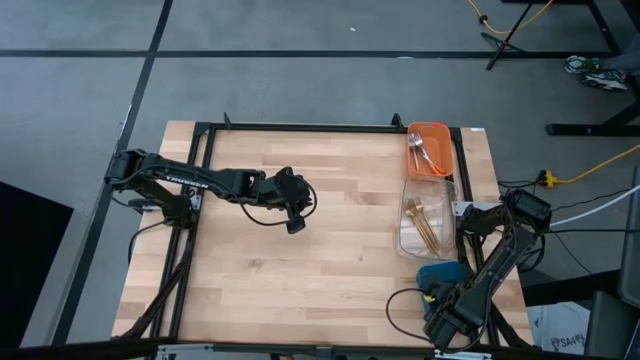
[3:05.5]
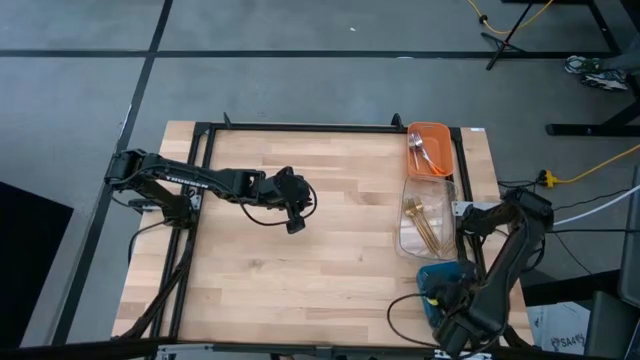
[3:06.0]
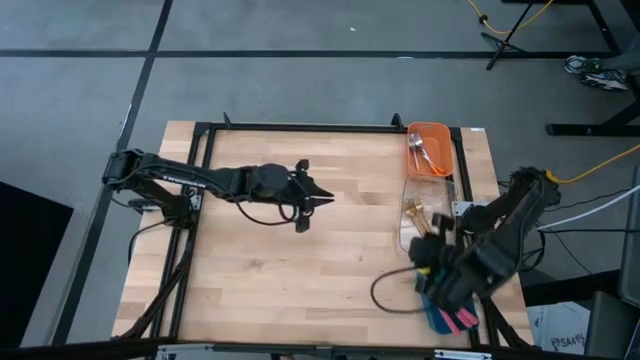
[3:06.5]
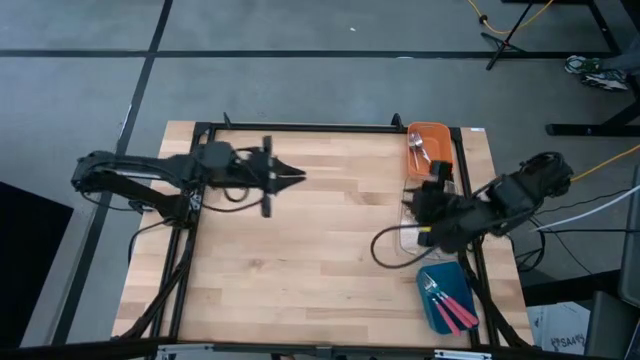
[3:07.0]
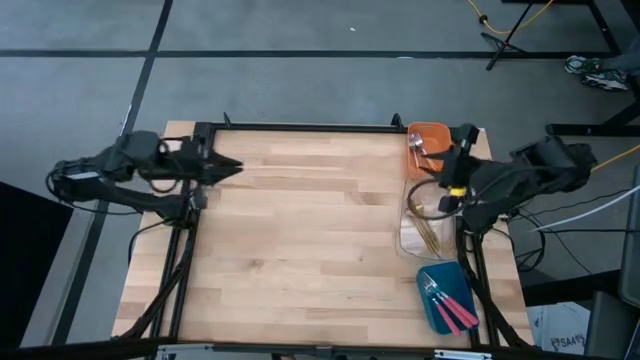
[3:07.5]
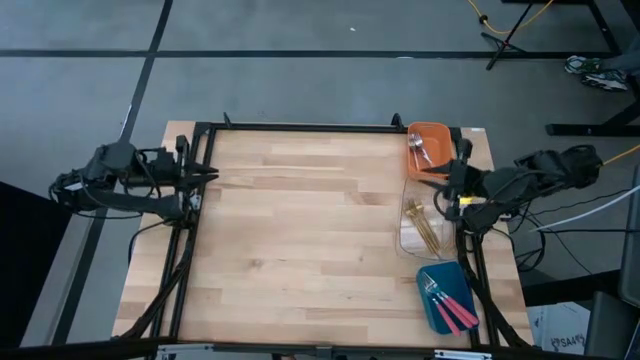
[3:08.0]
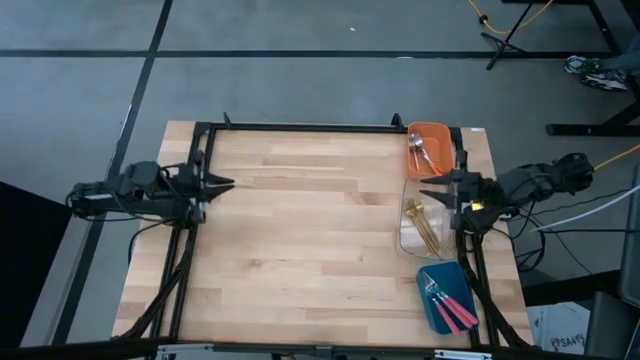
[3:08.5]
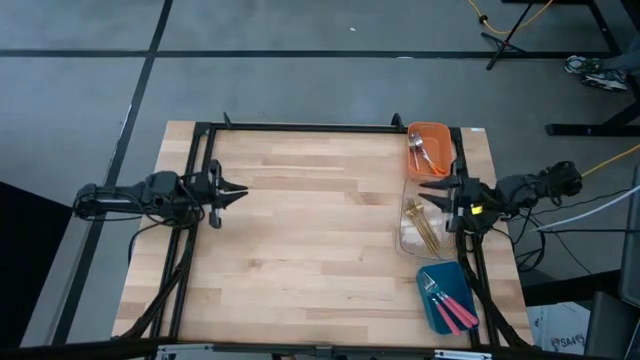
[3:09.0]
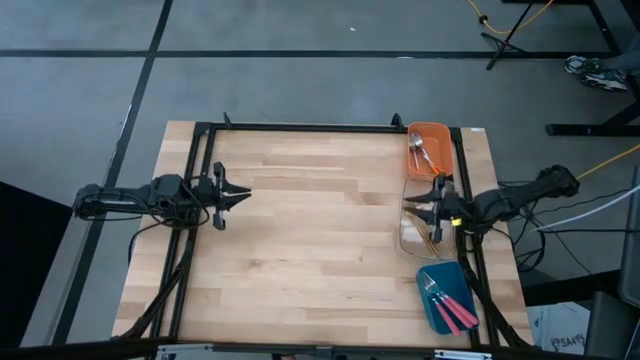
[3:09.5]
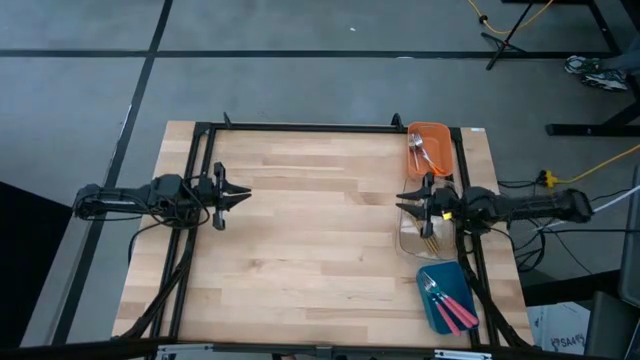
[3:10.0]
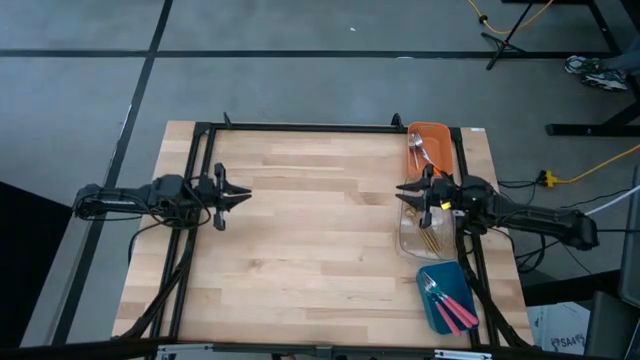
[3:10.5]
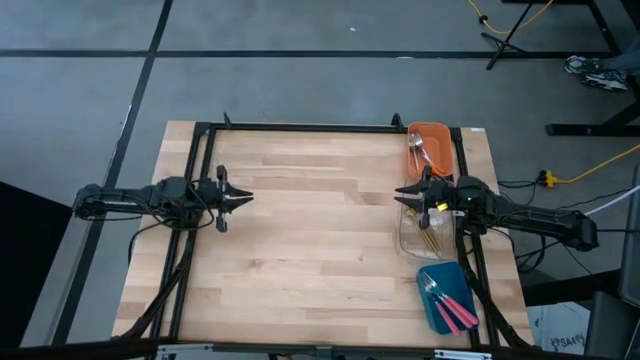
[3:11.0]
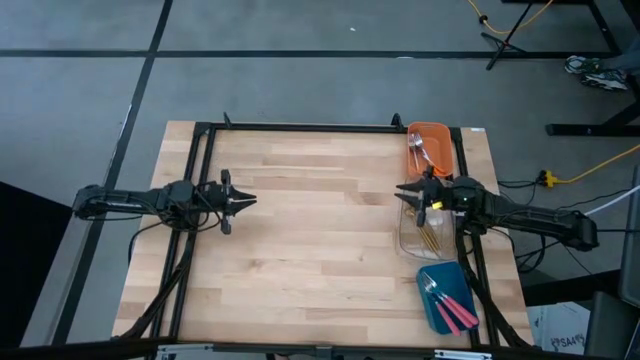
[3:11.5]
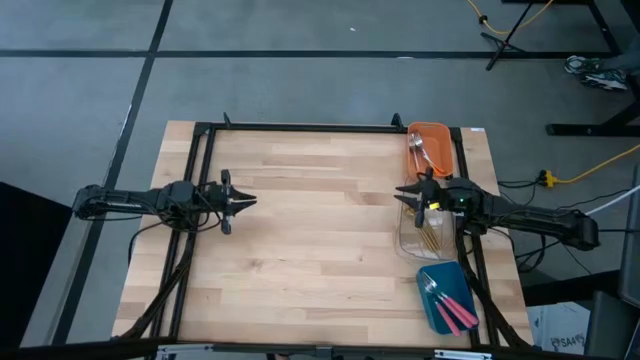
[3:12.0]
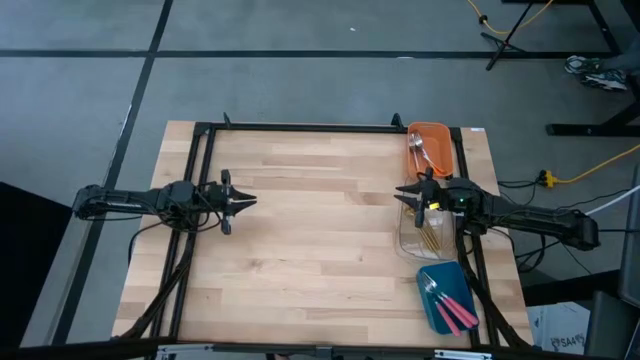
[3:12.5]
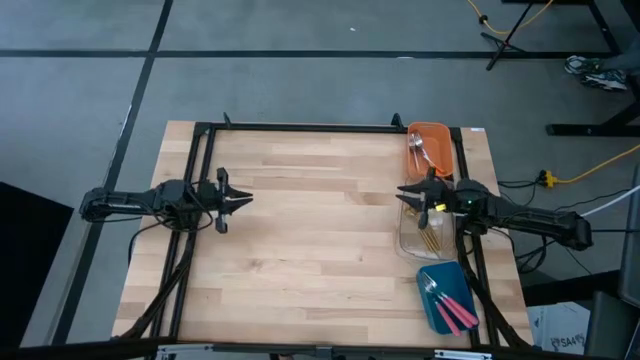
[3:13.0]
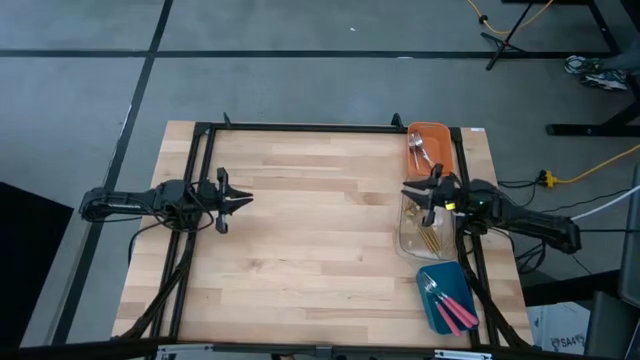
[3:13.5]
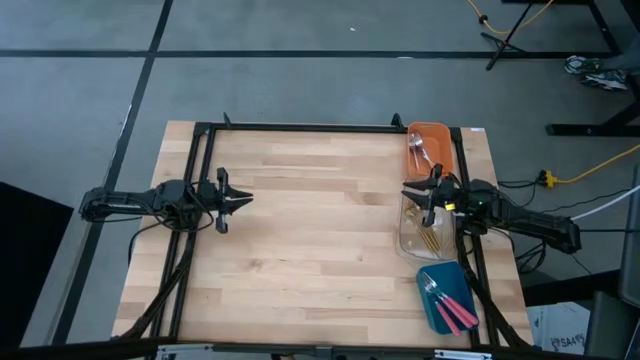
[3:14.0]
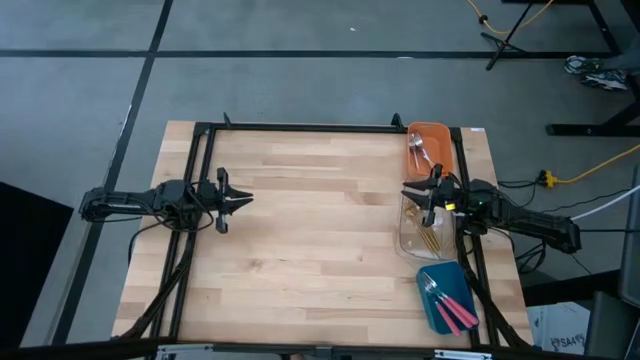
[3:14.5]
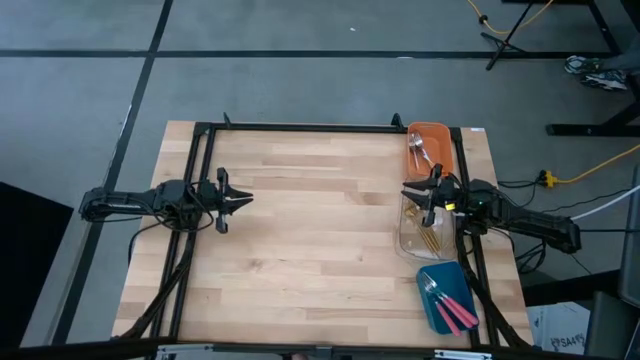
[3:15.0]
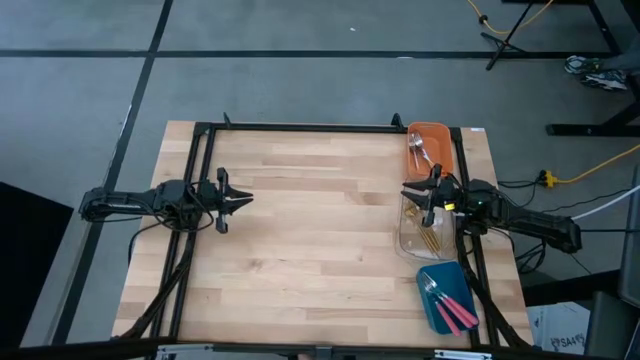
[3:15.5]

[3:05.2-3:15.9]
Task: Sort silverware by color (type)
Return to Home Position

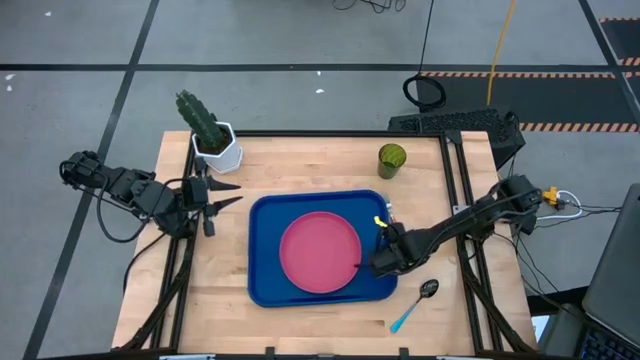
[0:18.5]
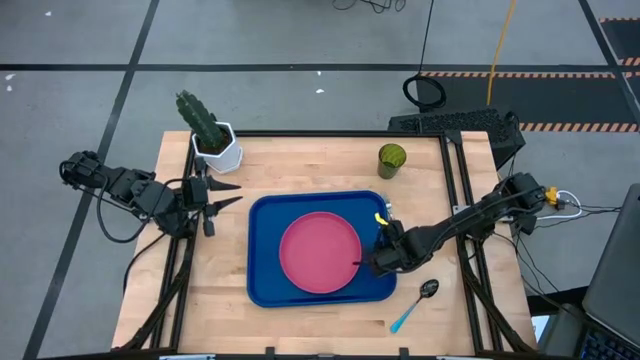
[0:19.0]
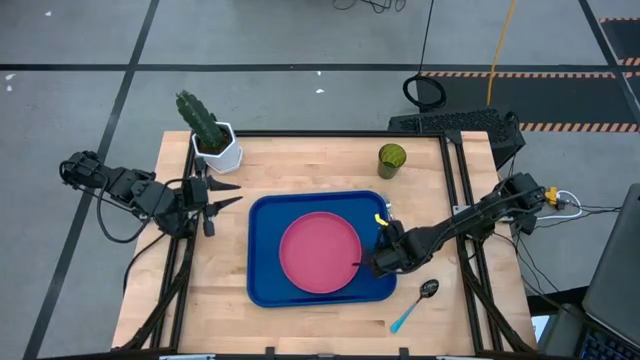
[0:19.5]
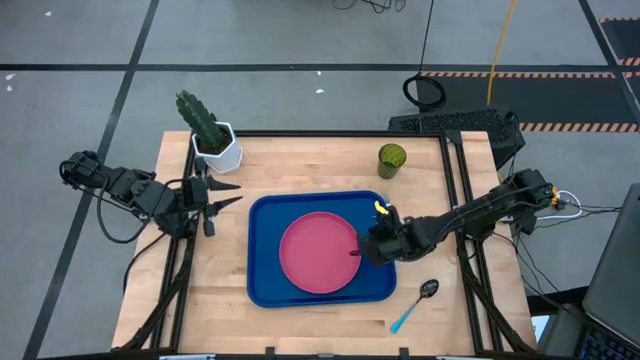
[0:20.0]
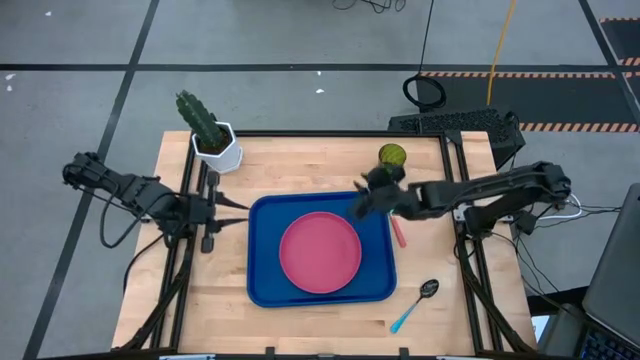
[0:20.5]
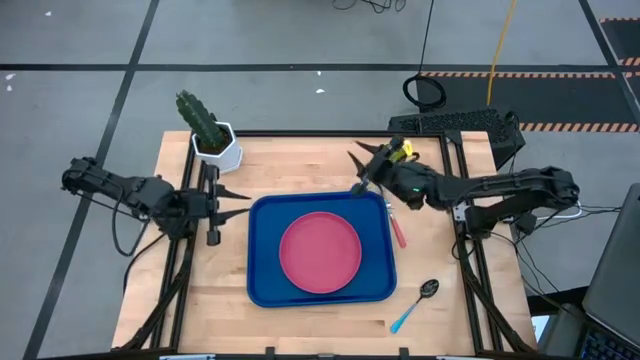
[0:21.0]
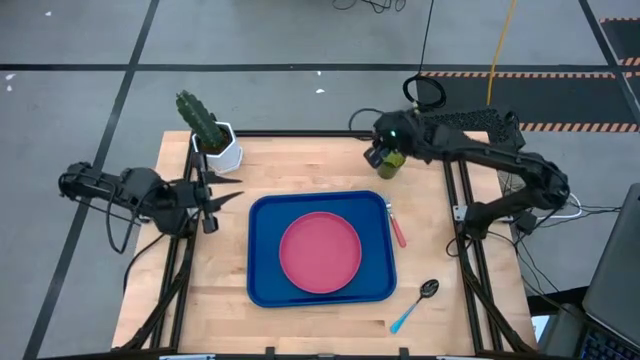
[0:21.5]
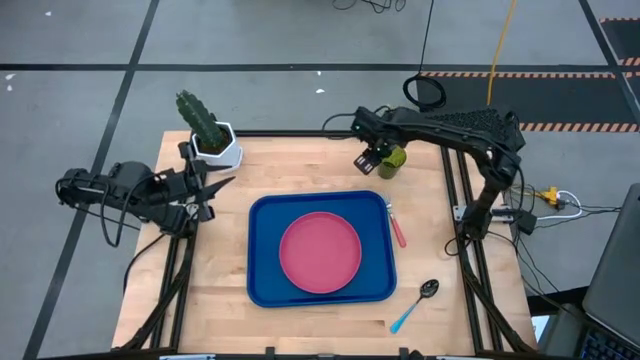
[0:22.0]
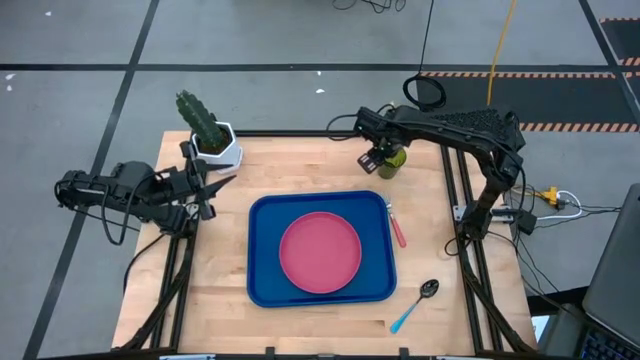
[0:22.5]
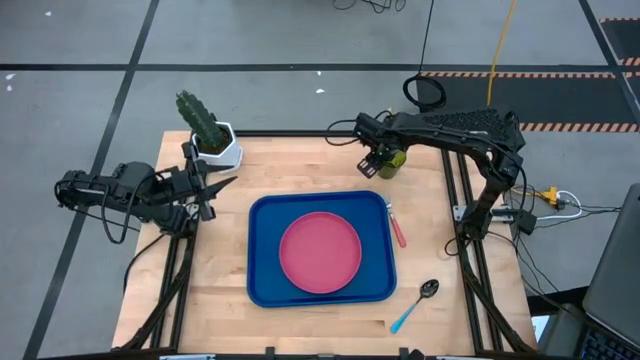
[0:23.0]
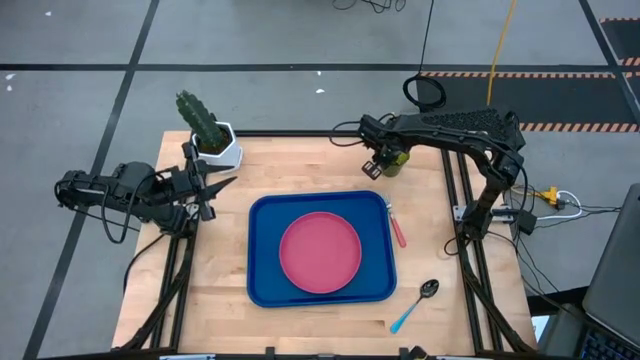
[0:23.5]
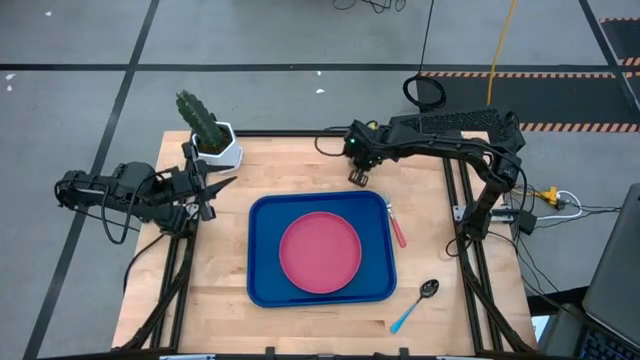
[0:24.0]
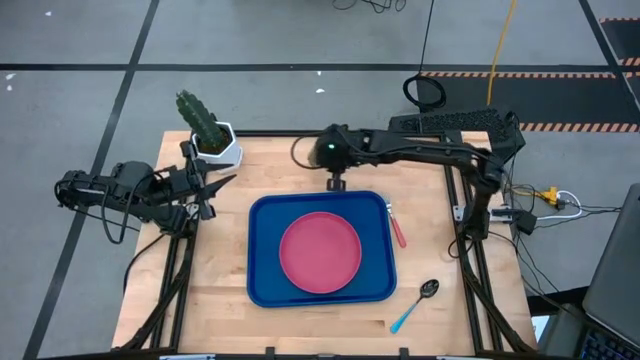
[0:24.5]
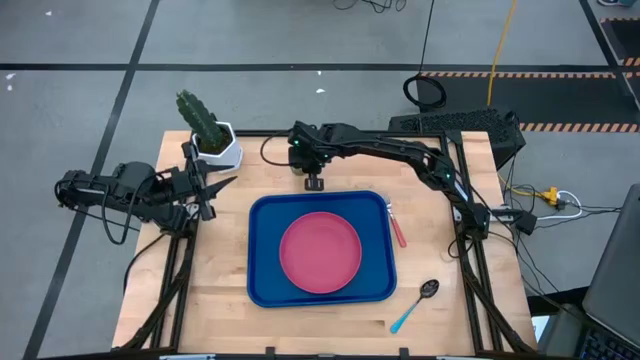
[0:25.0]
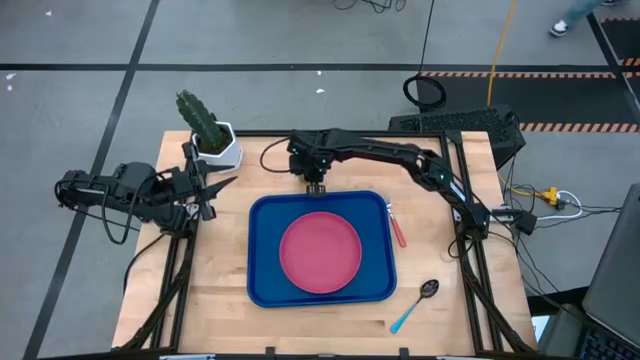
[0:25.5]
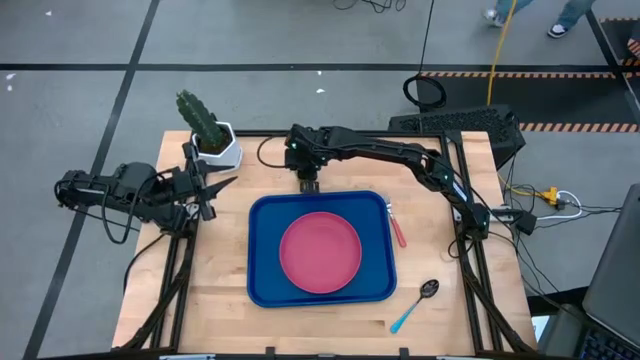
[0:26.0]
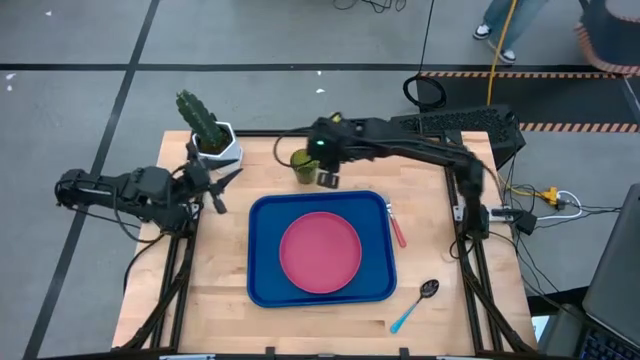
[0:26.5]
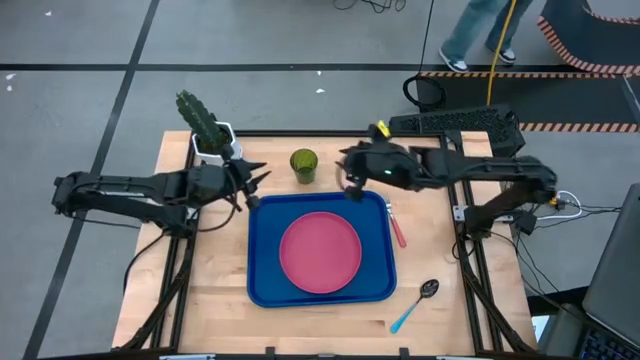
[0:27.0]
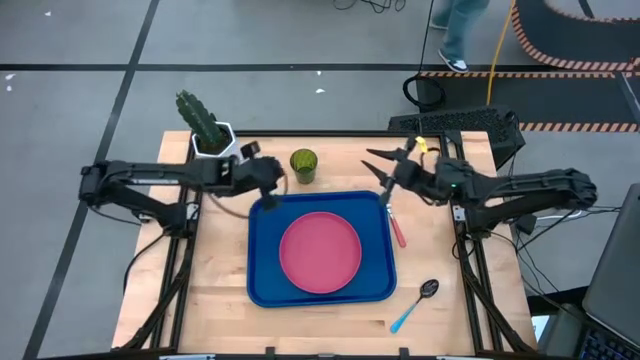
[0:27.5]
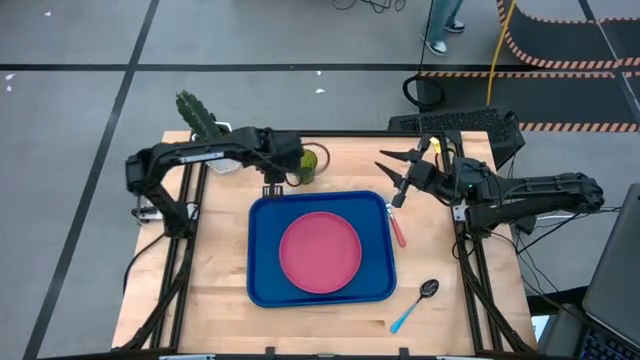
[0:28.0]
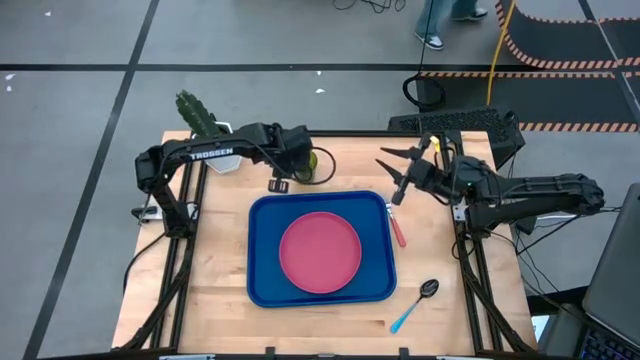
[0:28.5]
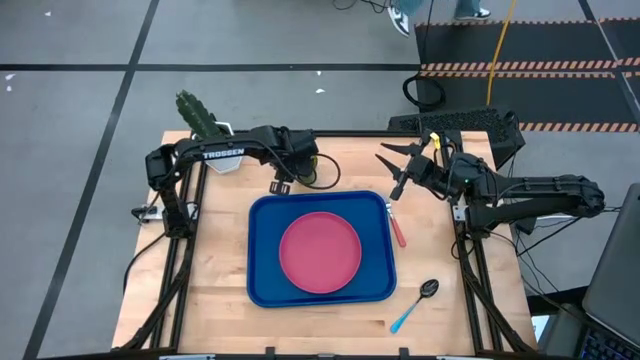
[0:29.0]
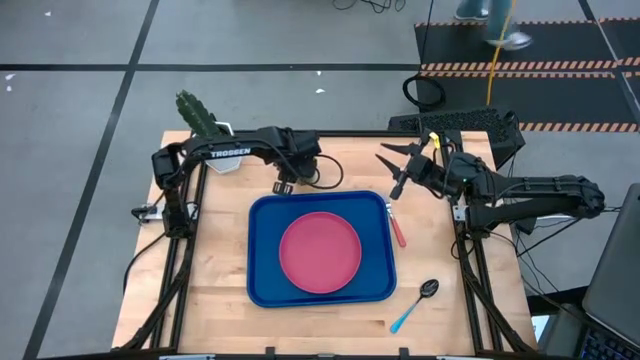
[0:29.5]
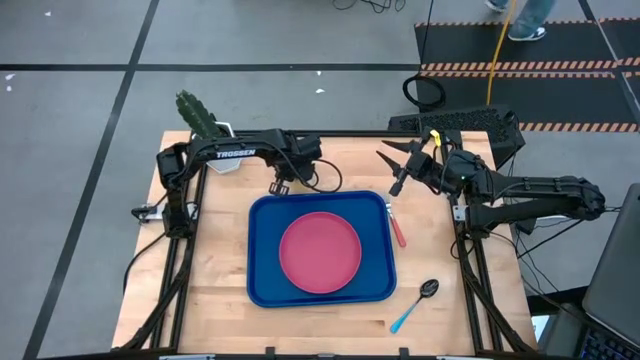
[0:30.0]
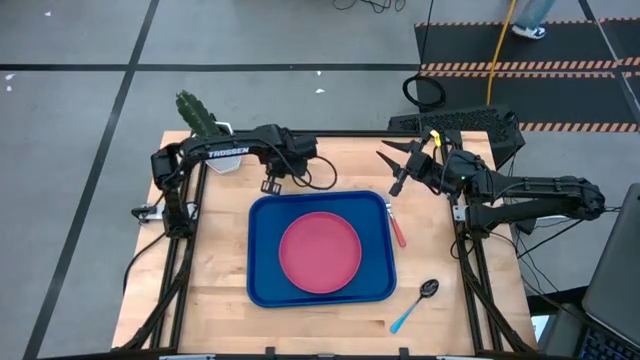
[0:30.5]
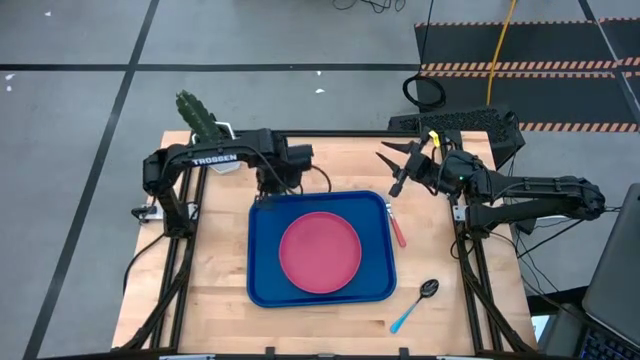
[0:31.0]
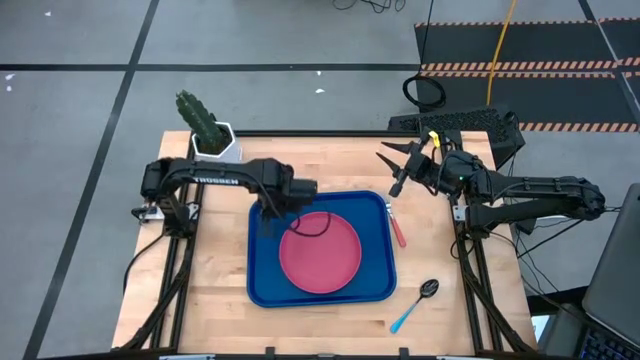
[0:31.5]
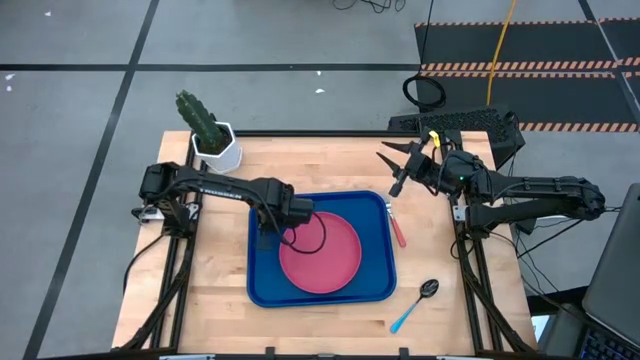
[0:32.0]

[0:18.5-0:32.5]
Task: Pick and place plate/cup/fork/spoon on tray
Put the green glass on the top left of the pink plate on the blue serving tray
